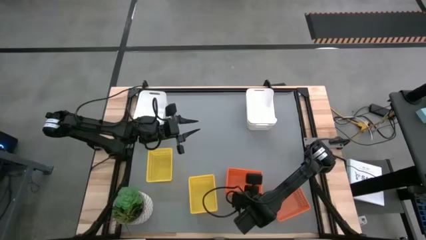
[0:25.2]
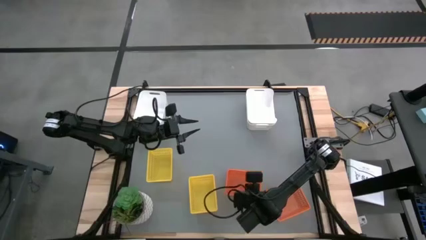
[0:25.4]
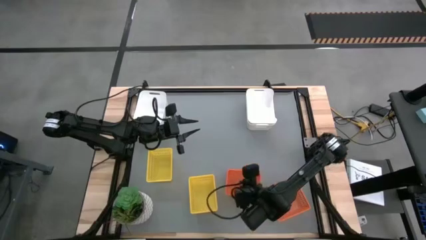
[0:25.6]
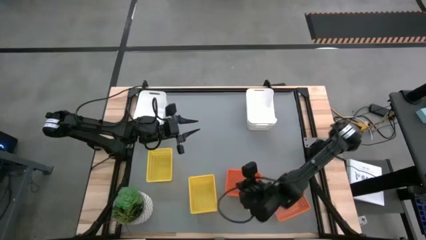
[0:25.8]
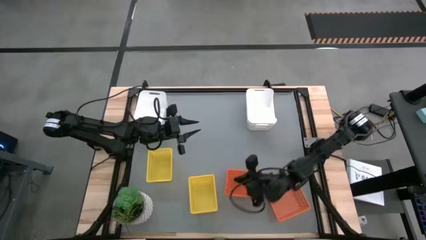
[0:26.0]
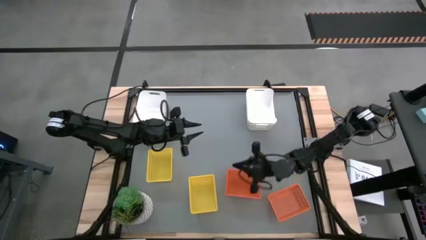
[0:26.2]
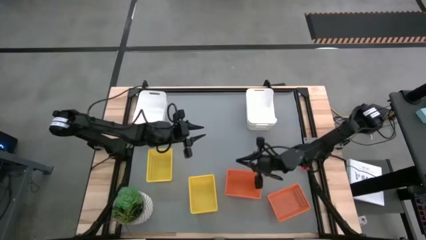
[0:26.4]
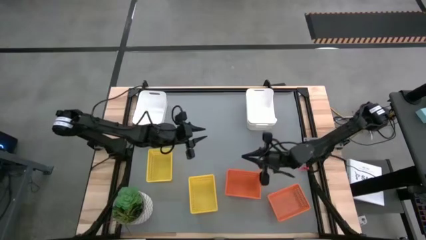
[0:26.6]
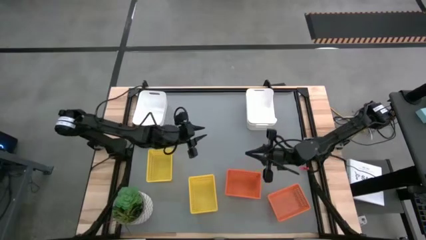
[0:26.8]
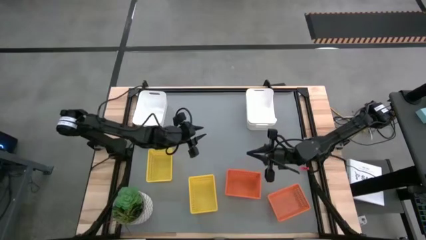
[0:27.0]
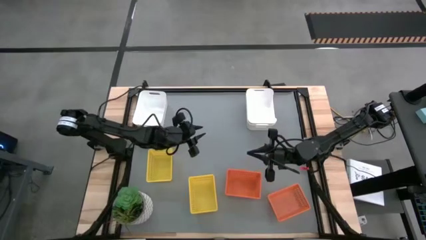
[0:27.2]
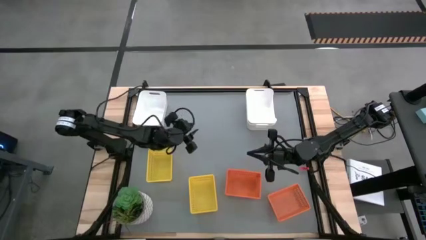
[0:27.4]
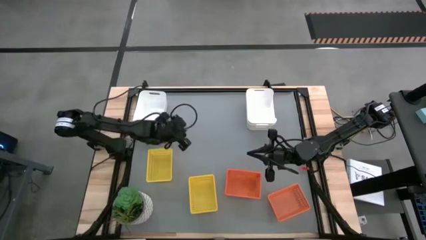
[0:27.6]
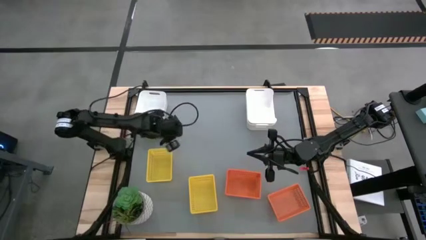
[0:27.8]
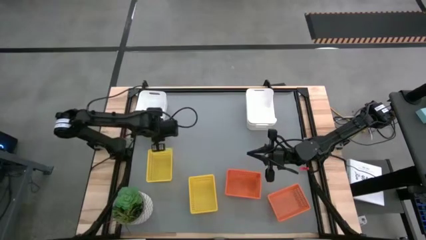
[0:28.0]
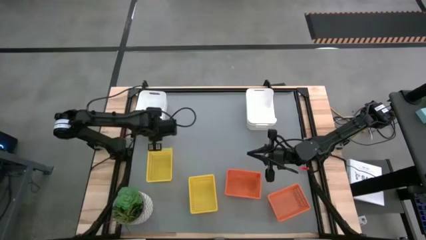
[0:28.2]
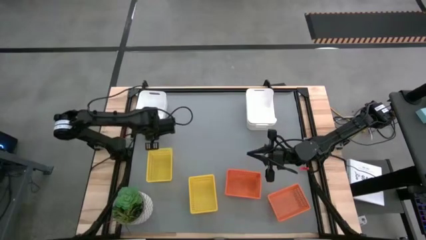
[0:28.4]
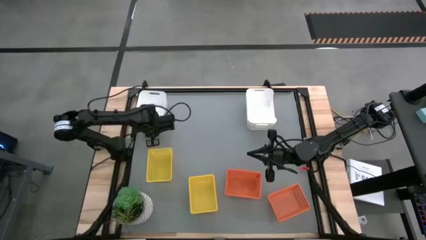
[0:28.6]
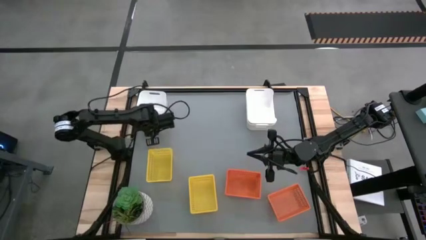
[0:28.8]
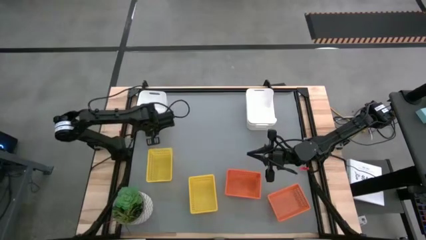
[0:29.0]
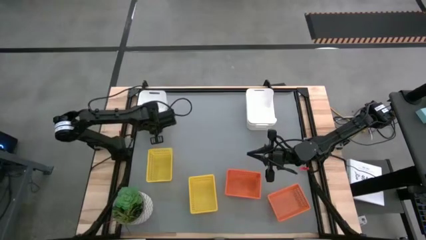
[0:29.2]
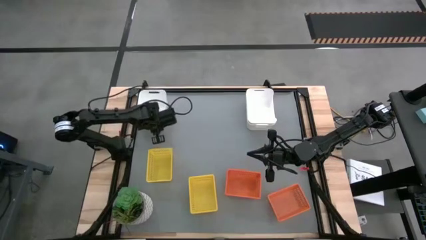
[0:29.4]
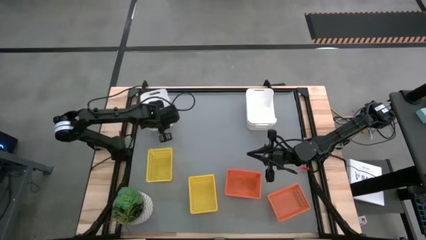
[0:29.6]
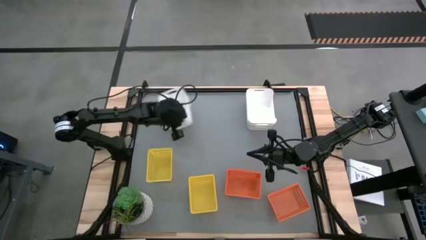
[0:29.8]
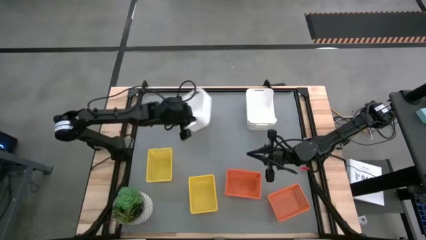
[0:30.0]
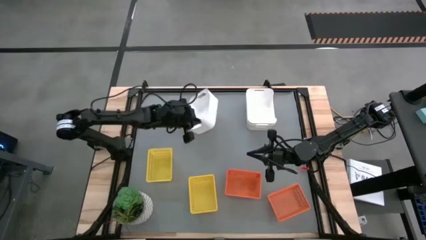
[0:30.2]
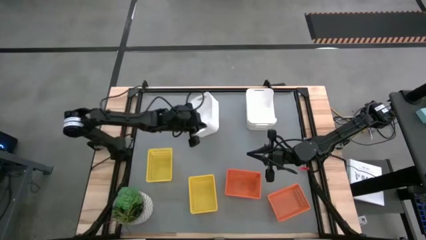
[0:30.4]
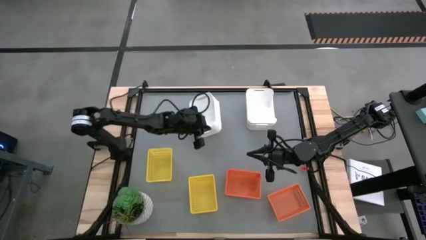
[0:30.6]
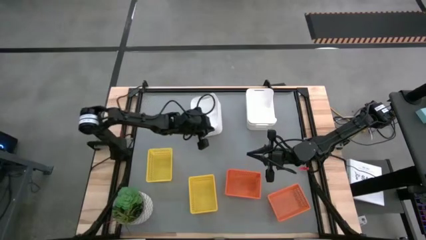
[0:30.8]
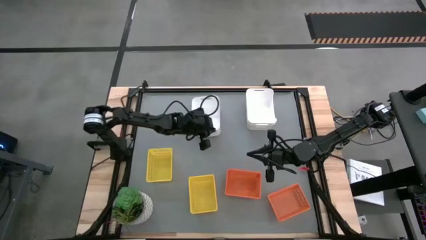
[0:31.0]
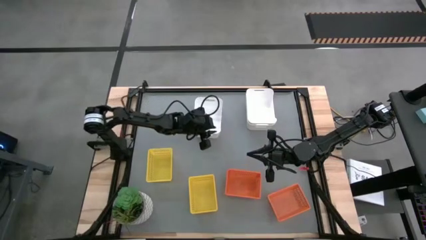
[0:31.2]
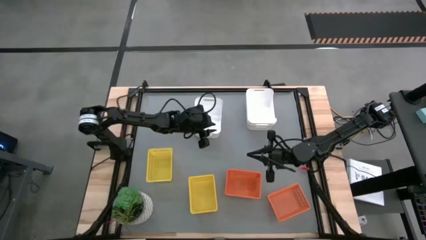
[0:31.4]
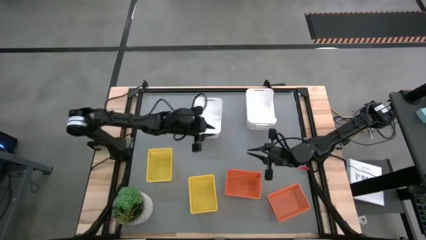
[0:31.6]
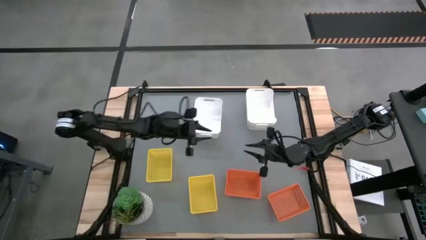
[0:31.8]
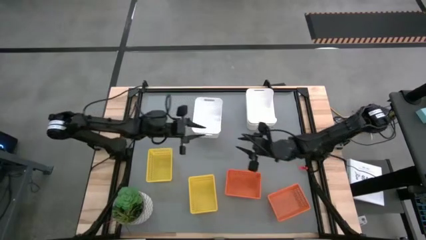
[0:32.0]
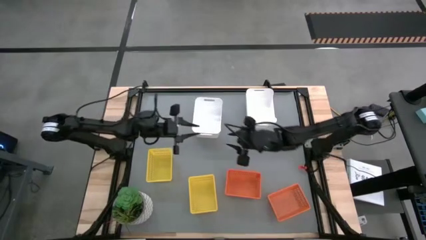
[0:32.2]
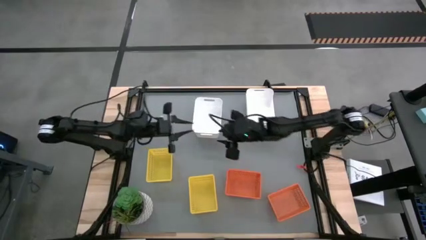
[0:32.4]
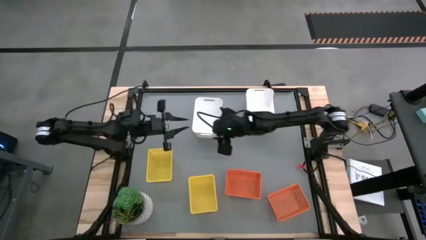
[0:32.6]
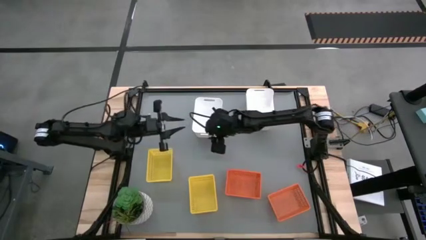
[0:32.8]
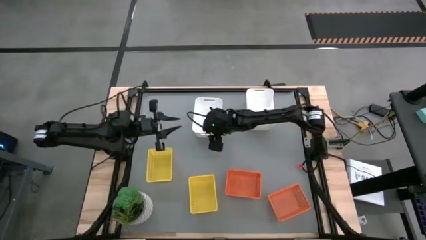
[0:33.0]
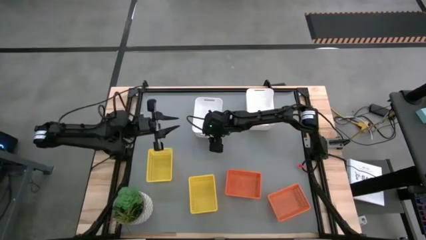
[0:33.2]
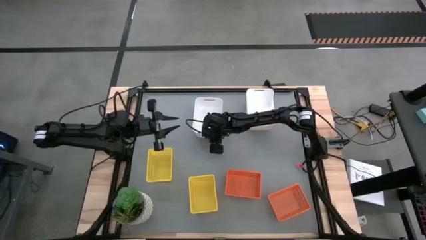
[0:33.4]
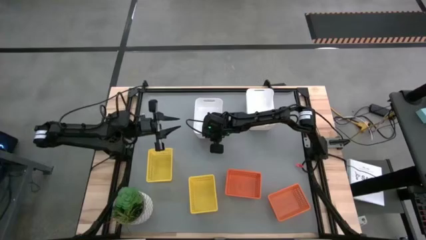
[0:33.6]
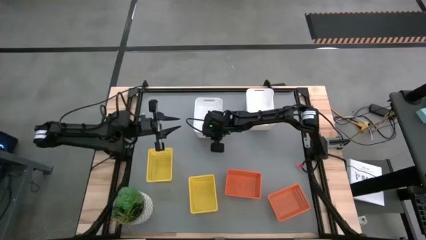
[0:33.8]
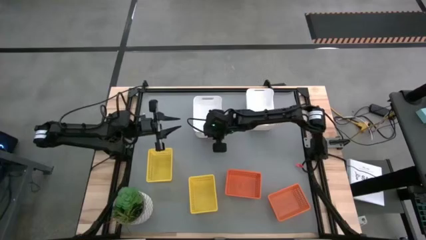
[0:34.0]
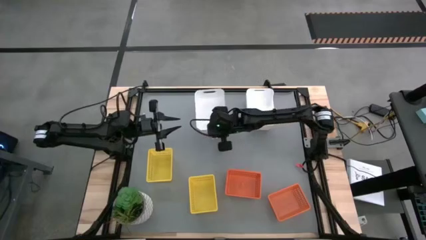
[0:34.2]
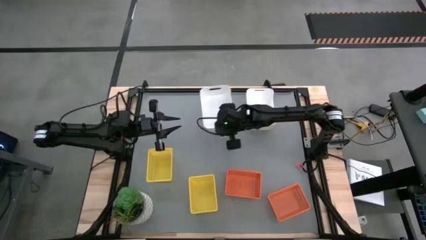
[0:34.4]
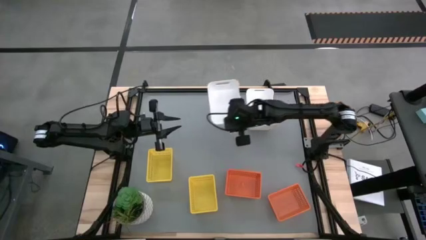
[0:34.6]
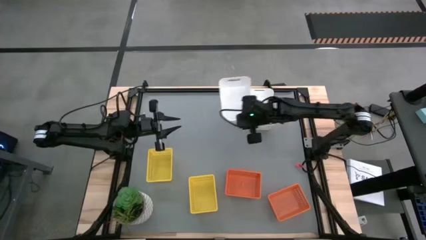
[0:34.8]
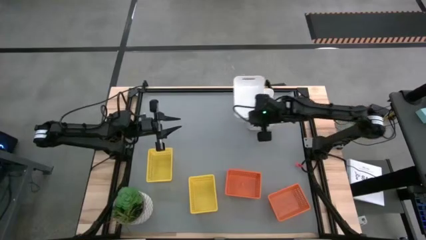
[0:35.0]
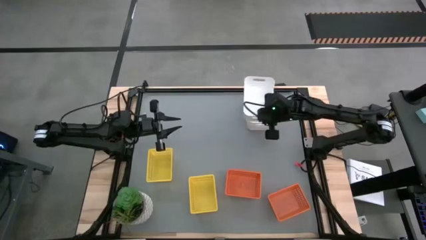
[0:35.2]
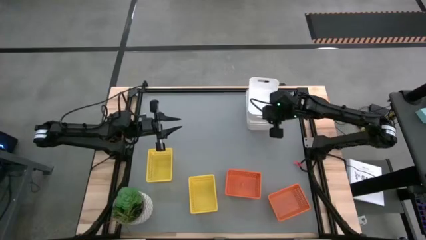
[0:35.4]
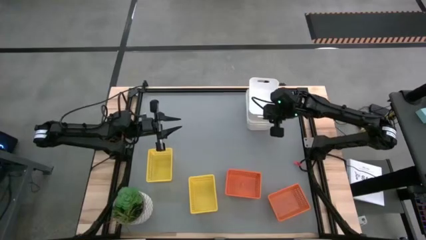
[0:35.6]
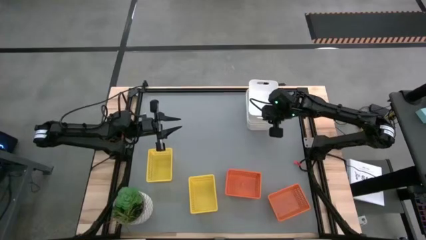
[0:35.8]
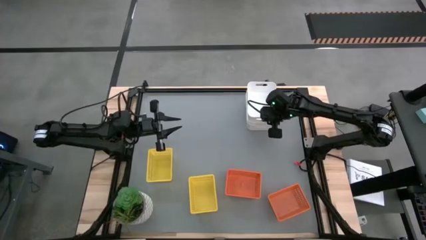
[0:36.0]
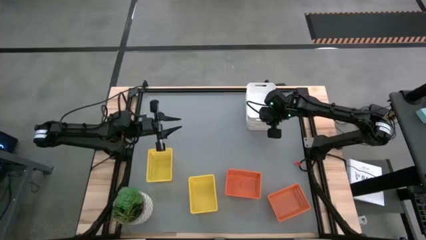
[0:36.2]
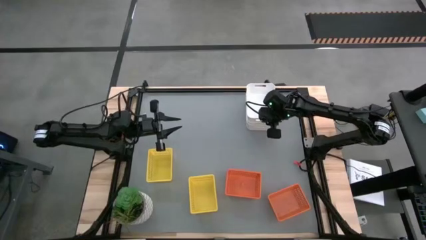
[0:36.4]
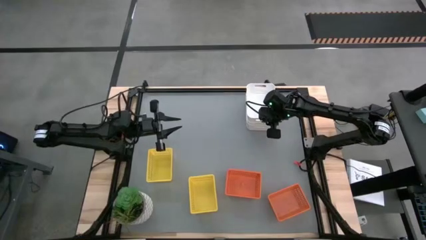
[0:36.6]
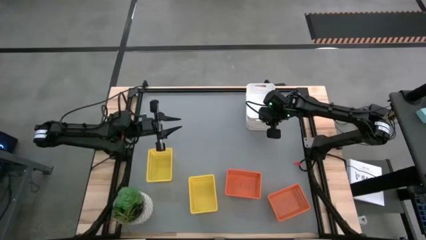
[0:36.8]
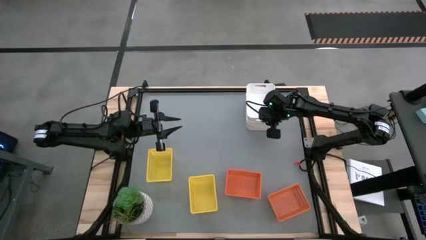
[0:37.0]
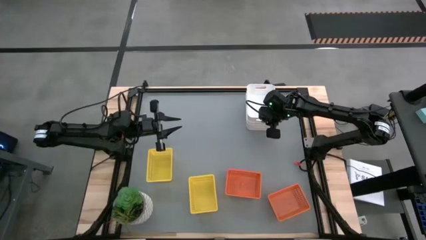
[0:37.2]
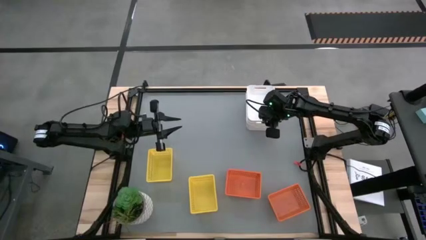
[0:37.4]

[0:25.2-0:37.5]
Stack the left white bin on top of the right white bin

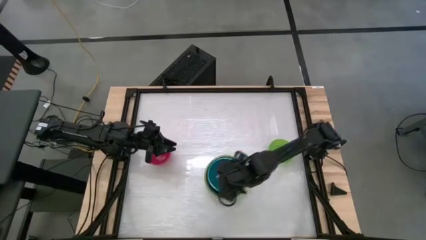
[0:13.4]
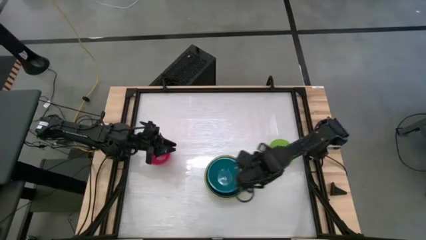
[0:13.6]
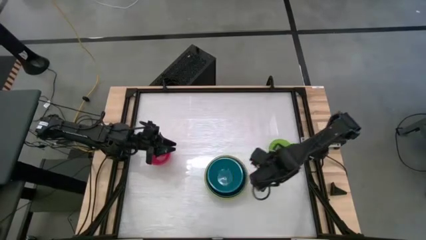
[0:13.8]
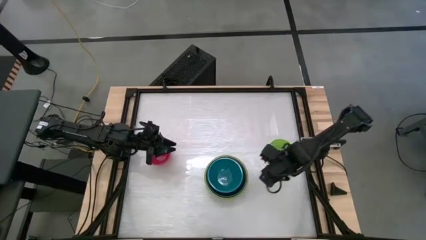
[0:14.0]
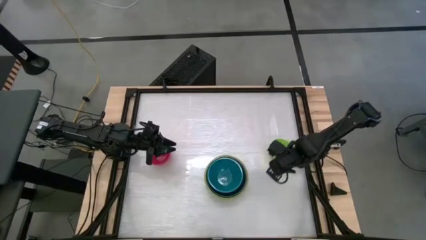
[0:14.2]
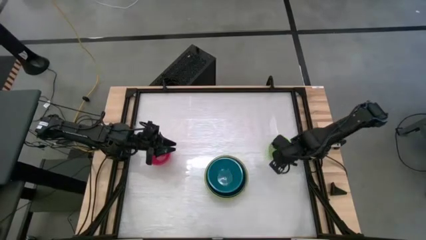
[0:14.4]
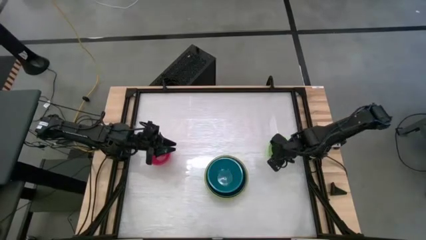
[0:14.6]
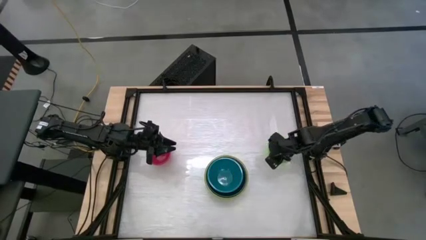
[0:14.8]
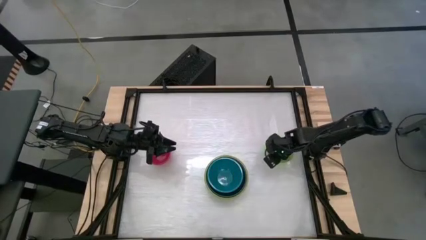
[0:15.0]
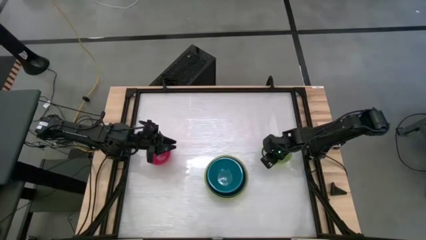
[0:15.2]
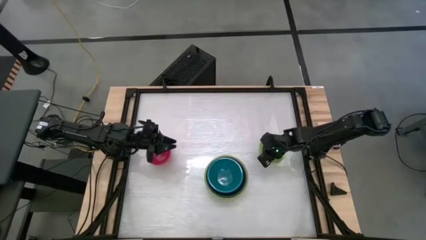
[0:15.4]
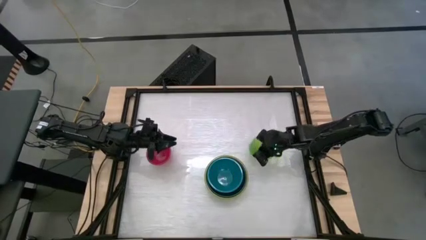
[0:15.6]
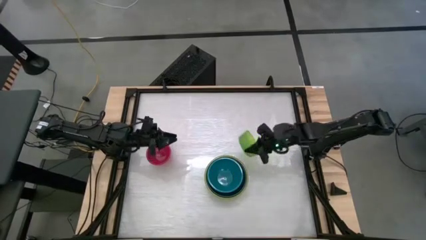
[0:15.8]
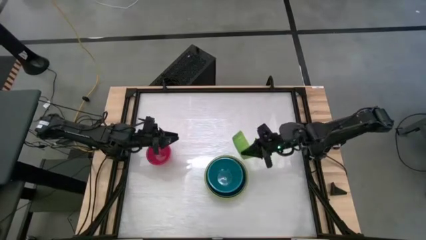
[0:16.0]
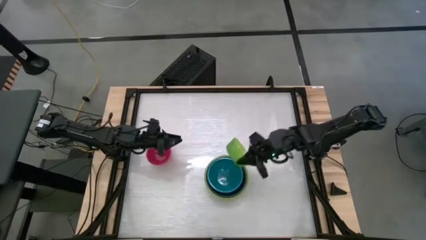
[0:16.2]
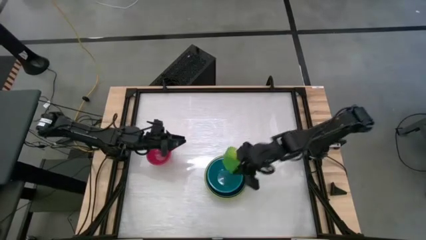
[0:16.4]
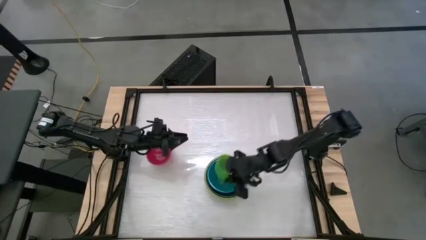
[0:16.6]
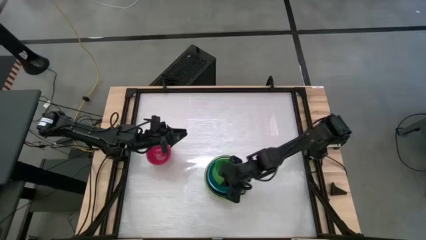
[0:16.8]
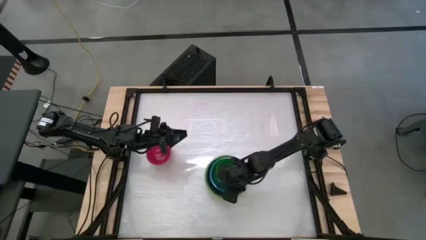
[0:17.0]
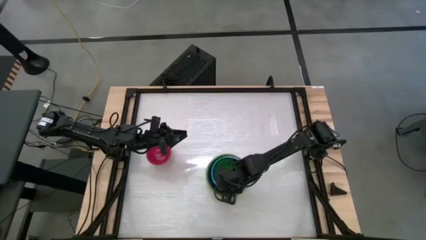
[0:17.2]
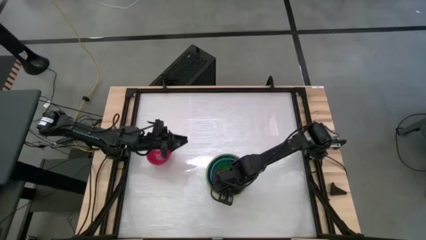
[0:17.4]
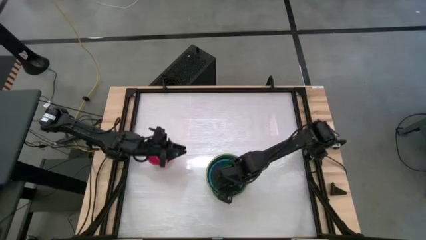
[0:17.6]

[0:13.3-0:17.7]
Stack the green bowl on the light blue bowl
